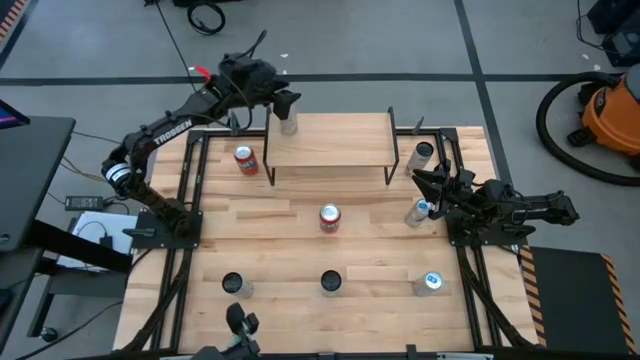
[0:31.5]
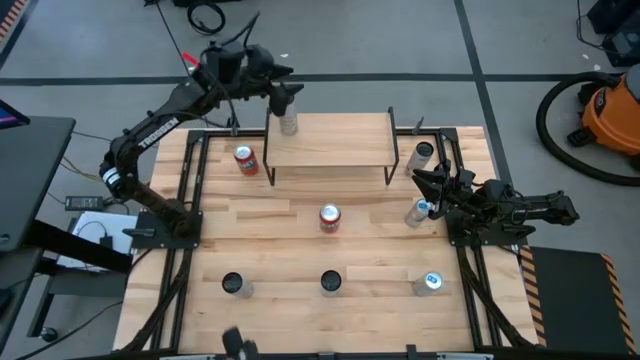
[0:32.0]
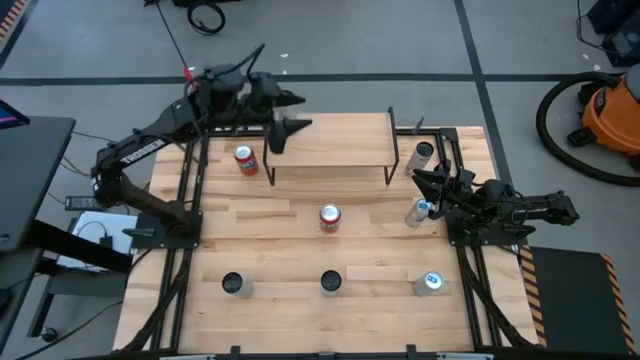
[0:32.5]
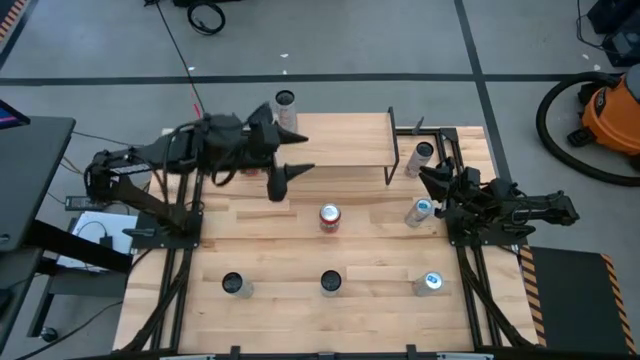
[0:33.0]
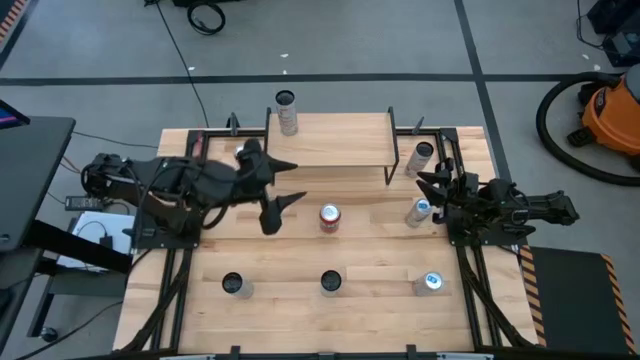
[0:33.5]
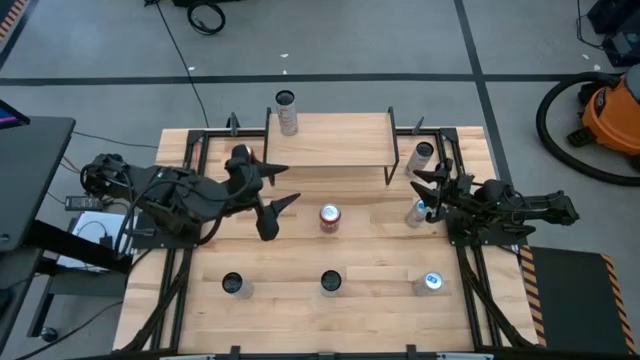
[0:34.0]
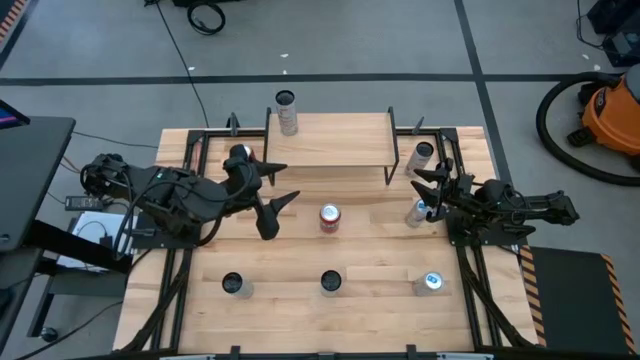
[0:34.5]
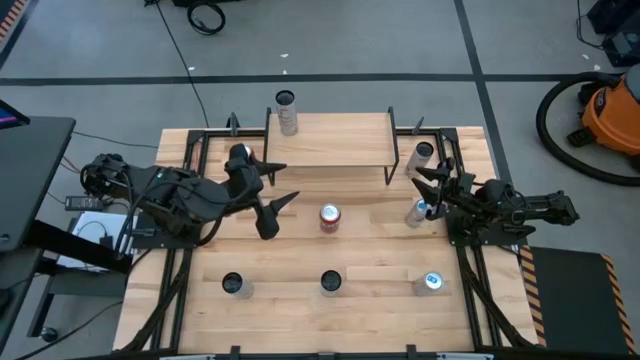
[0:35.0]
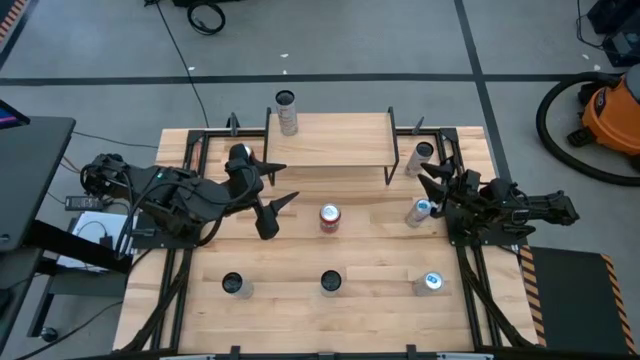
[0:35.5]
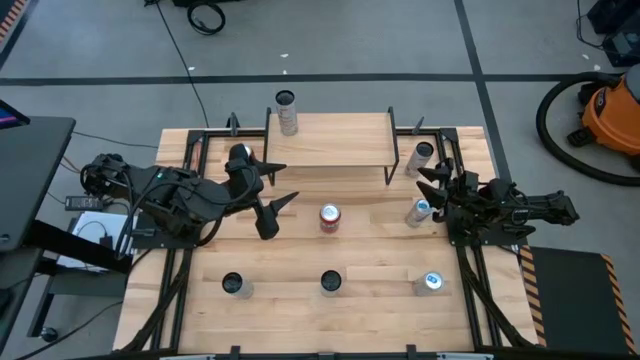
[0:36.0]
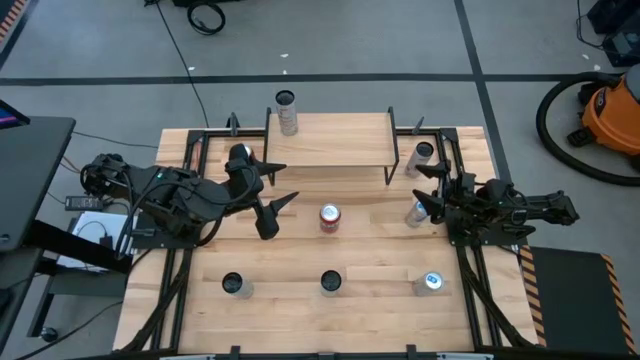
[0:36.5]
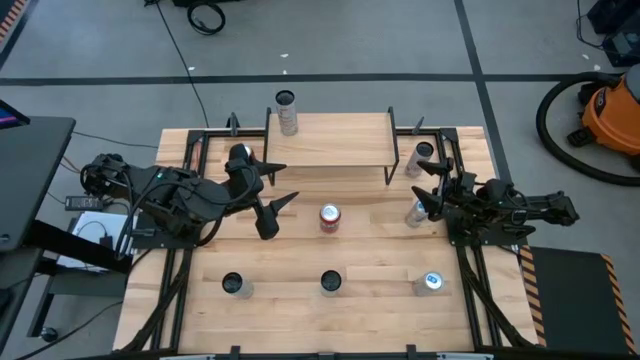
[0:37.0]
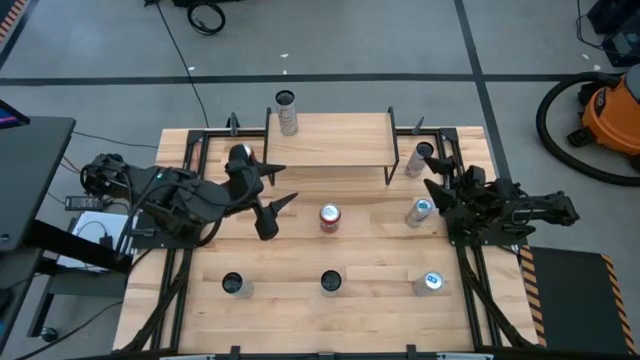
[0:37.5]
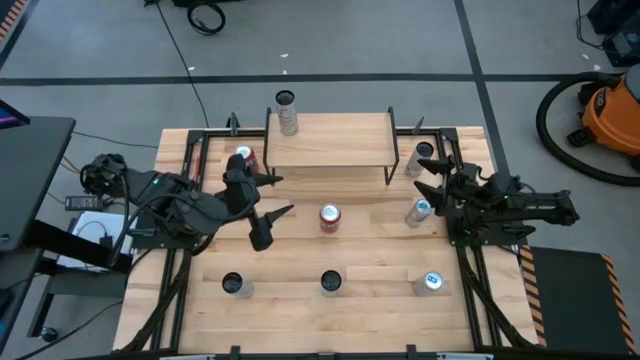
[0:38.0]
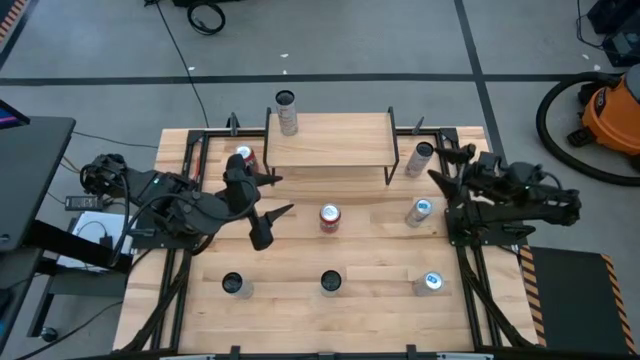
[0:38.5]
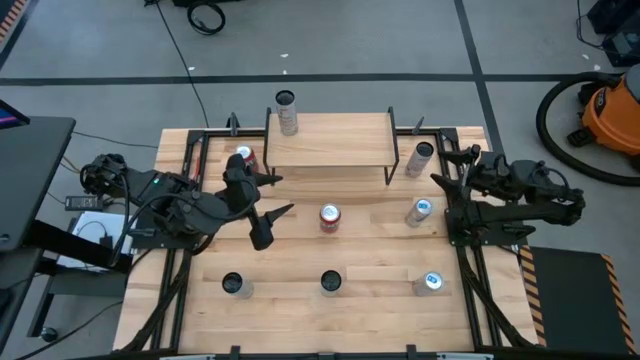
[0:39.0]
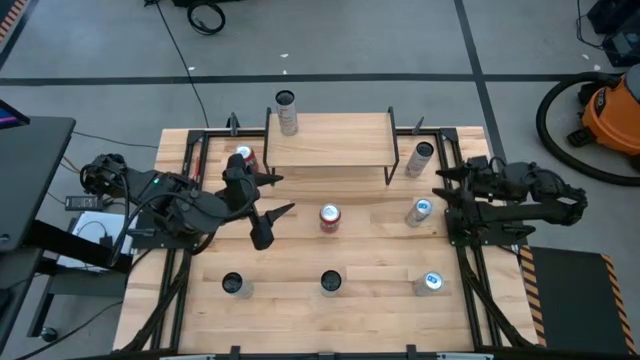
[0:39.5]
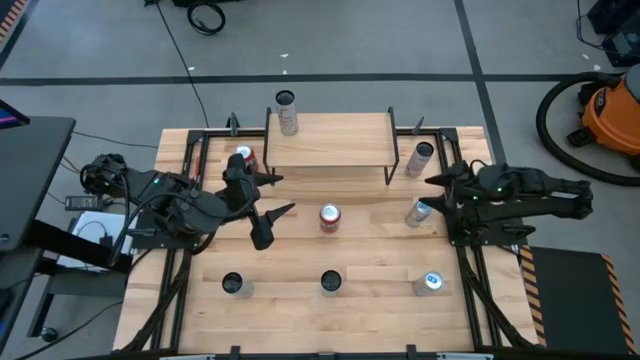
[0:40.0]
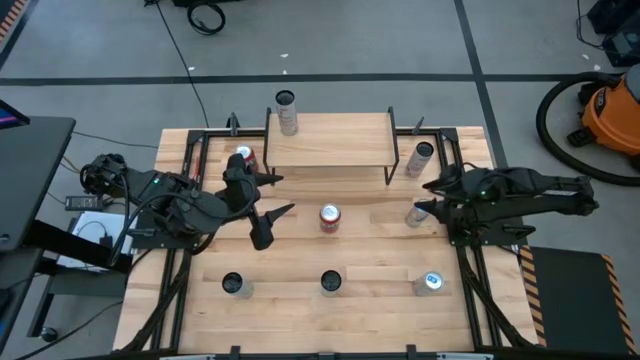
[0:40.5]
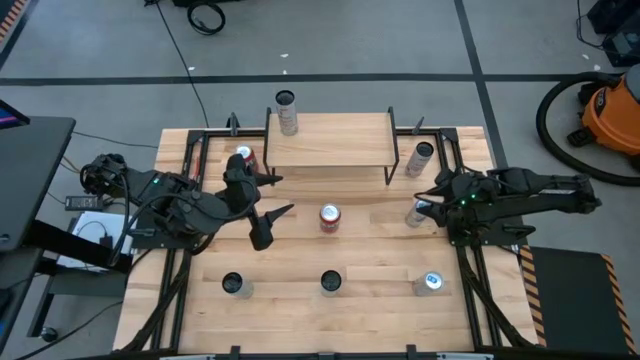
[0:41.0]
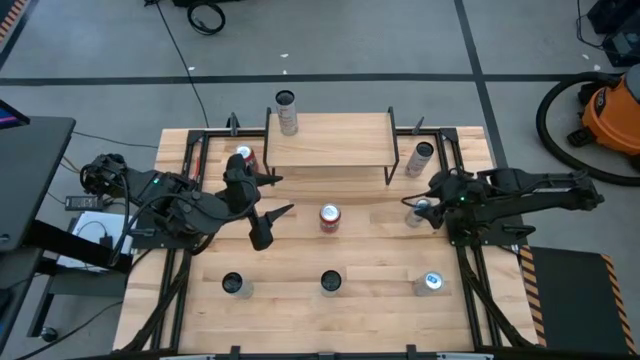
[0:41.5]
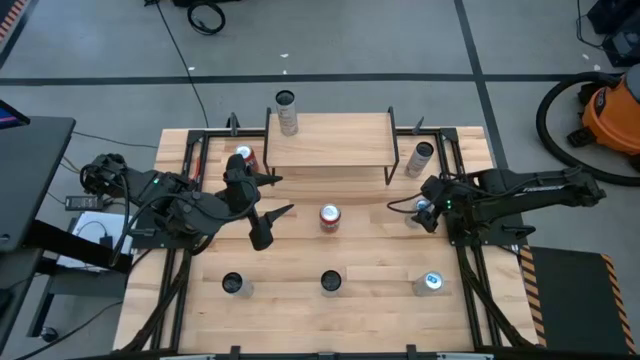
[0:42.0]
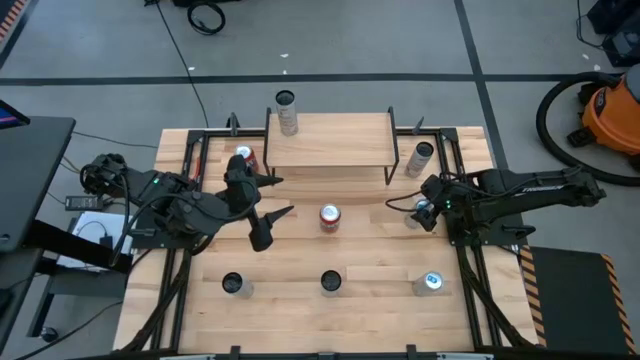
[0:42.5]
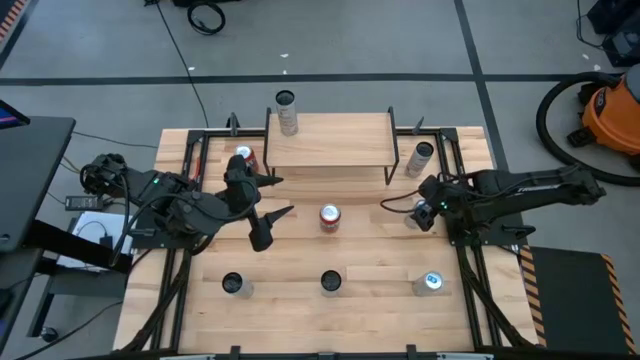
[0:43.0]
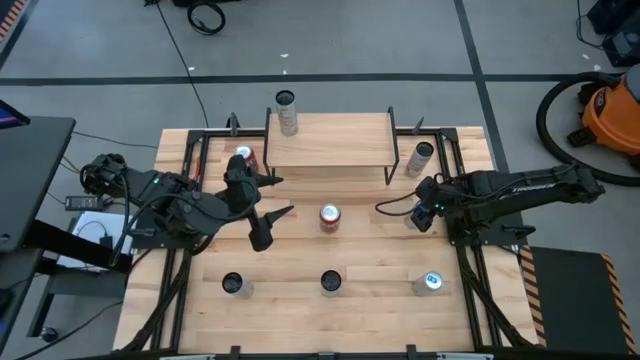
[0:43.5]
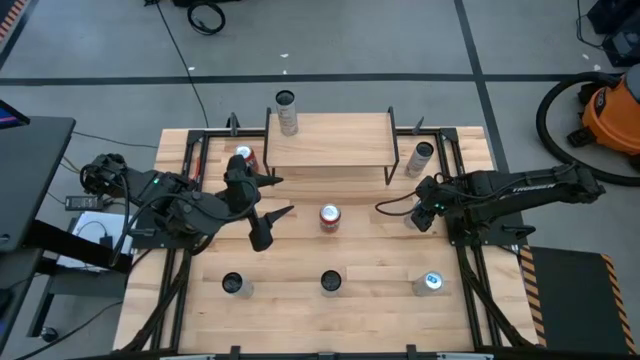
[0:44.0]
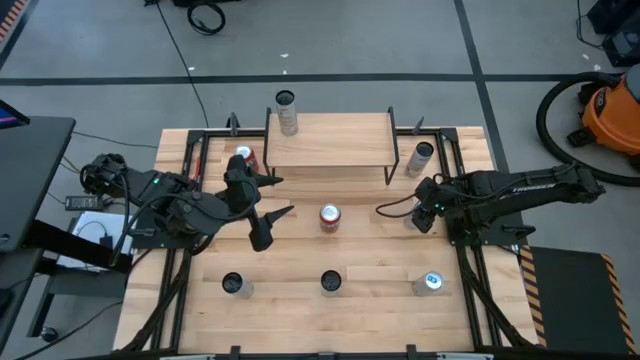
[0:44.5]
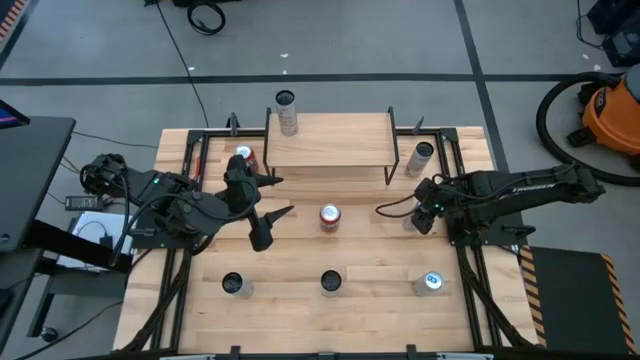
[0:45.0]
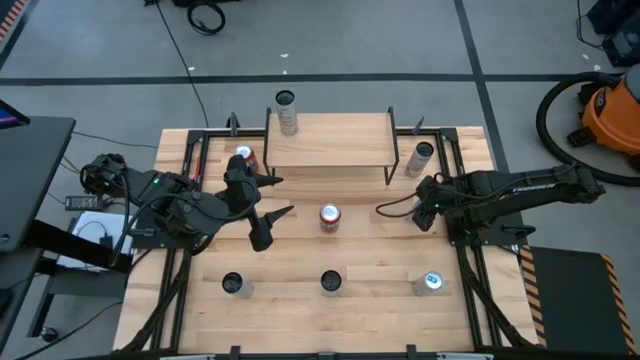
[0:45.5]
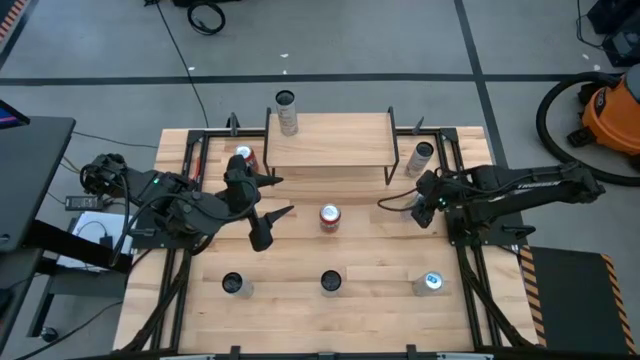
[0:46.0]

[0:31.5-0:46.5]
Task: Place canned beverage on shelf
Put the top blue soda can on the shelf

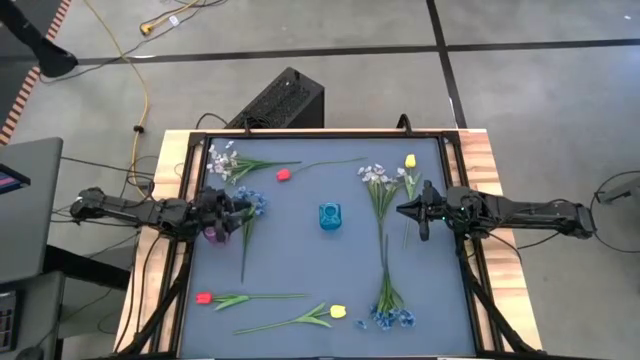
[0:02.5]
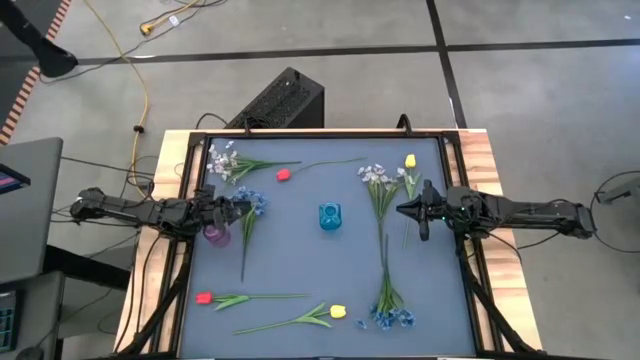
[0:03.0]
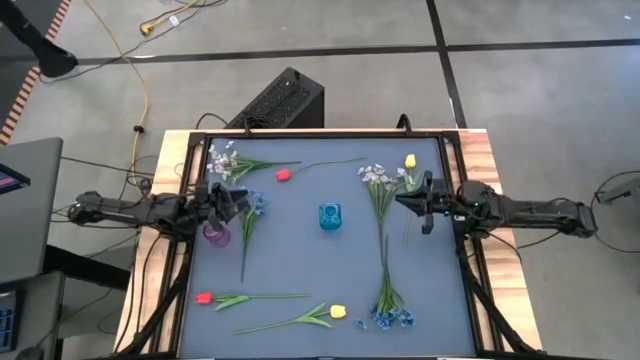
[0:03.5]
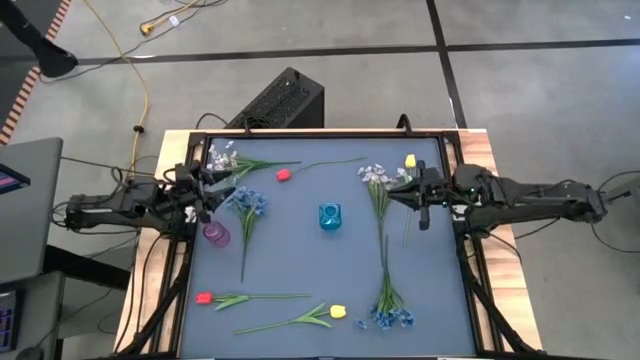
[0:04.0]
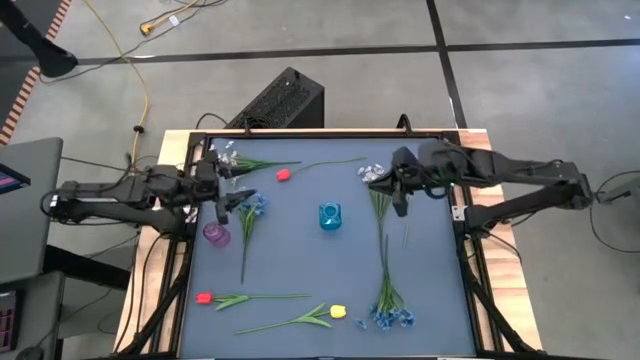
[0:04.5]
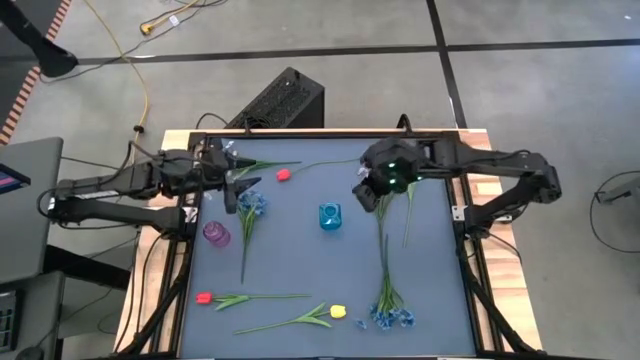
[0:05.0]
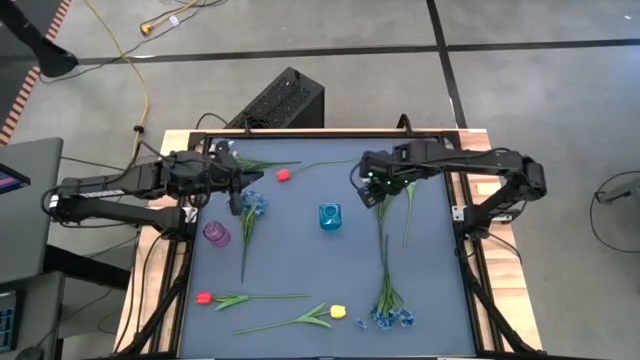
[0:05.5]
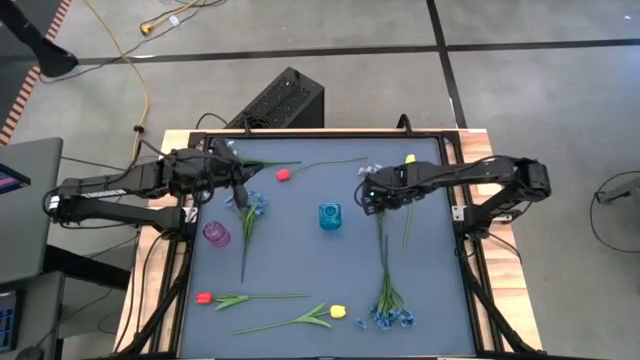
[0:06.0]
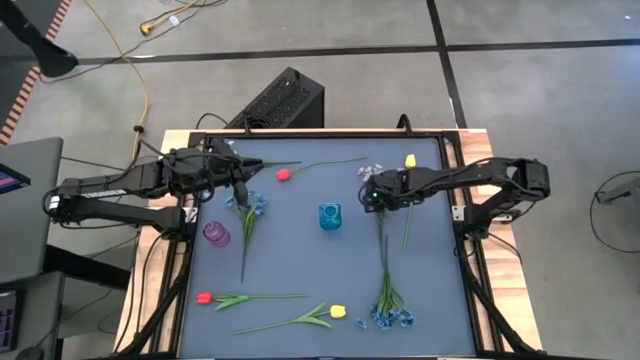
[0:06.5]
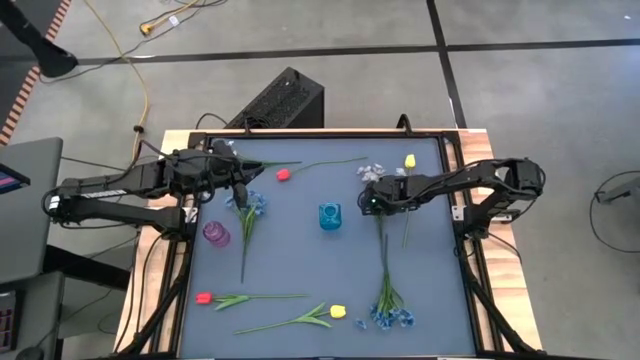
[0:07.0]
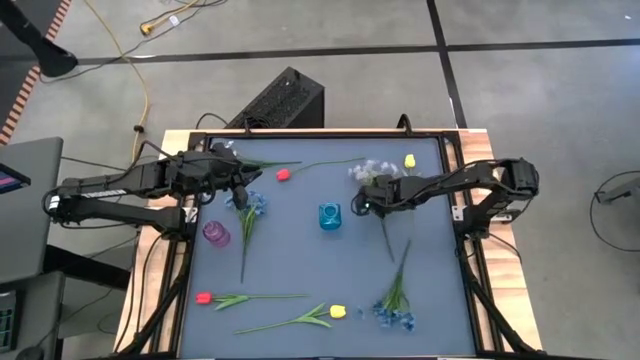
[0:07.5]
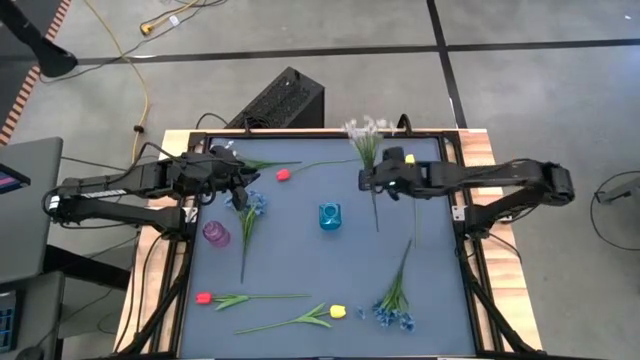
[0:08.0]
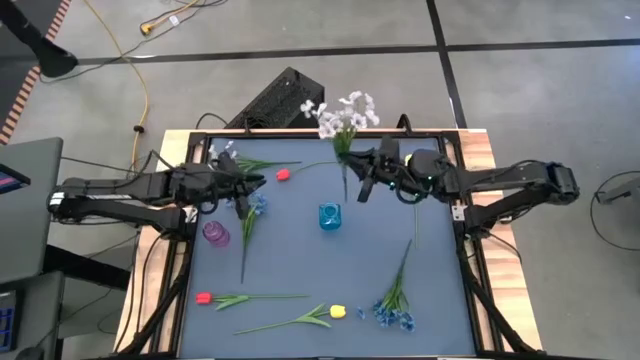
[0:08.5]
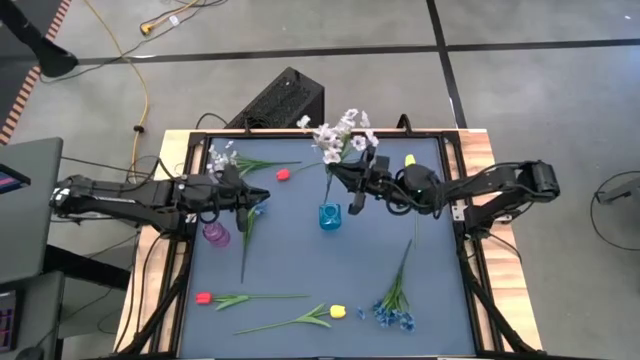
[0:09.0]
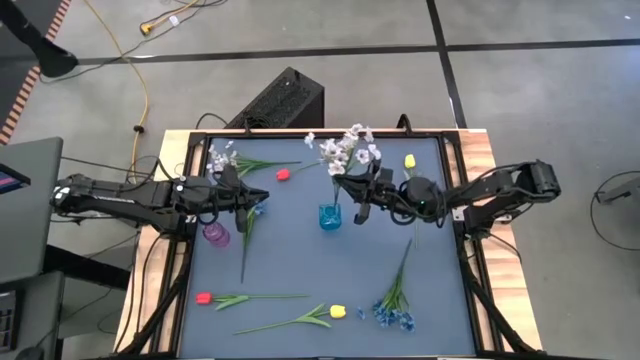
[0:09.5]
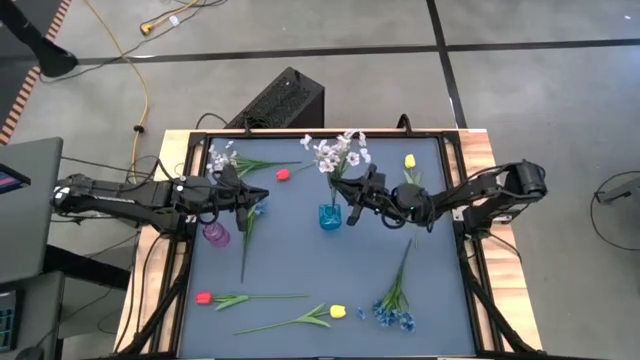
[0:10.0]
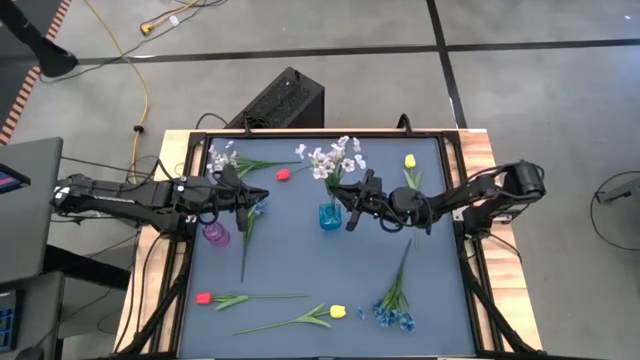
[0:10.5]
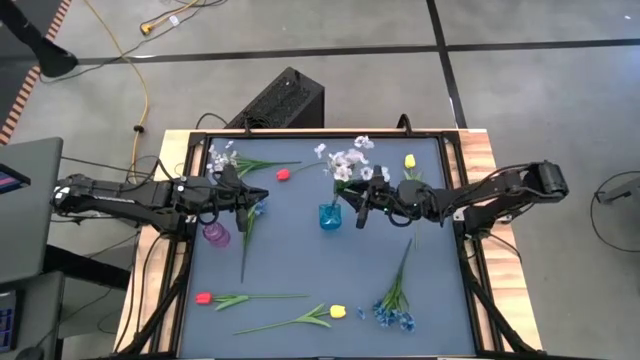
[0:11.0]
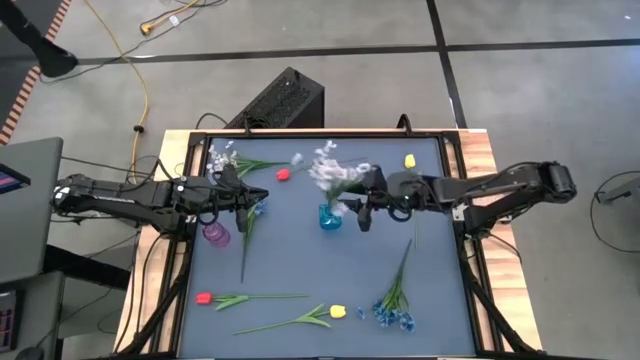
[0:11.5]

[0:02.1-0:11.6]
Task: Sort flowers into vase by color
Put the bottom white flowers into the blue vase
